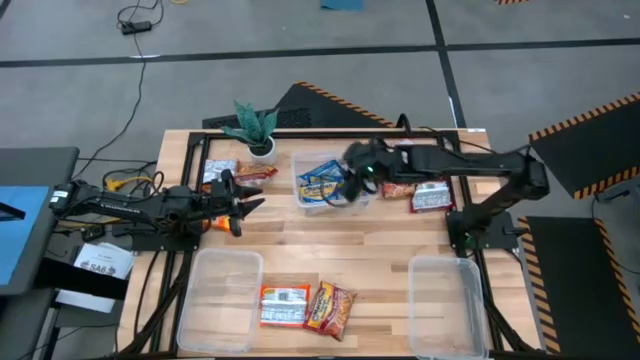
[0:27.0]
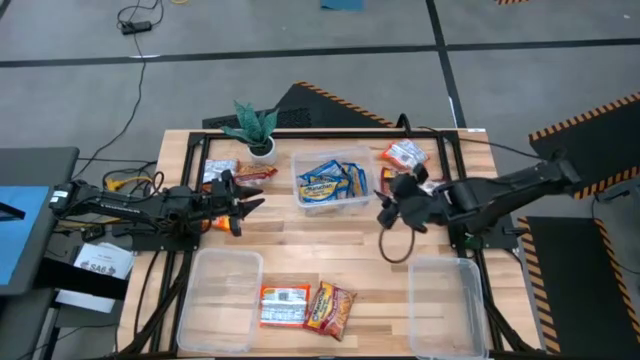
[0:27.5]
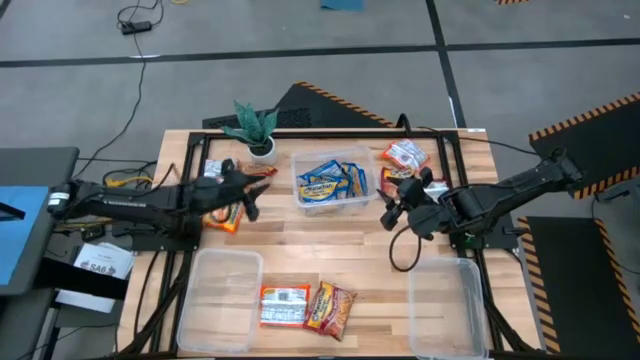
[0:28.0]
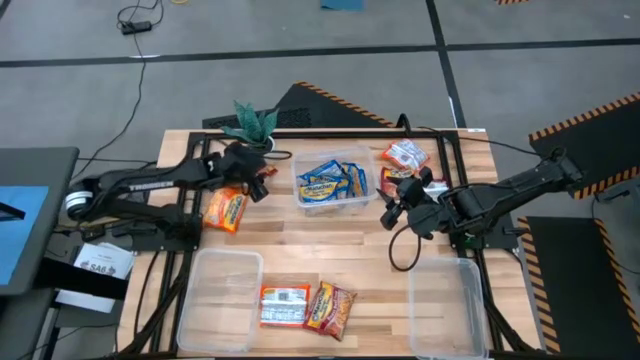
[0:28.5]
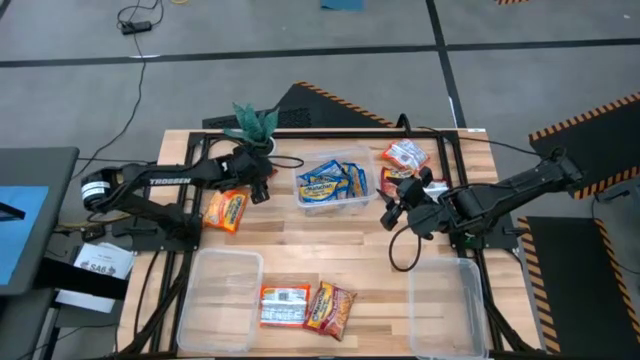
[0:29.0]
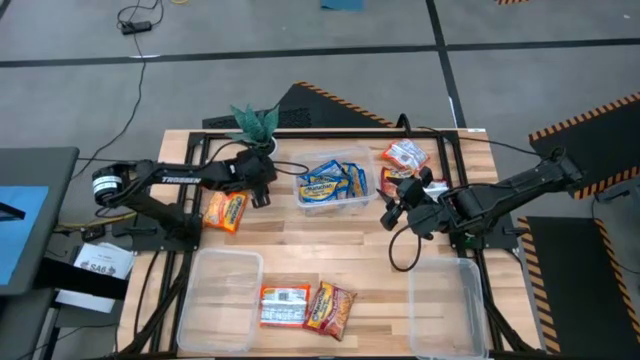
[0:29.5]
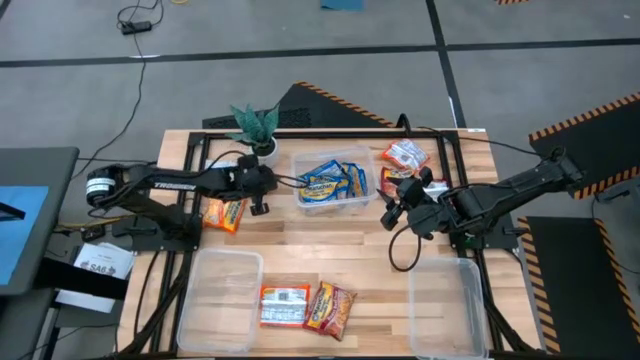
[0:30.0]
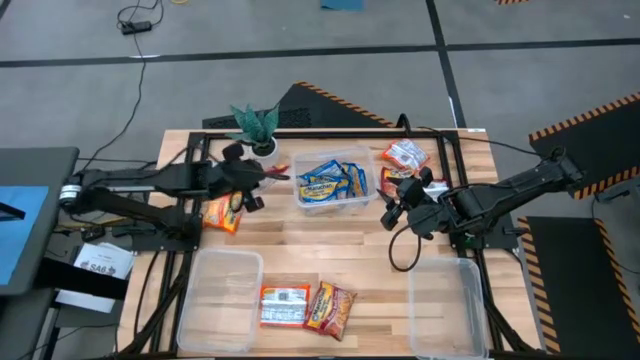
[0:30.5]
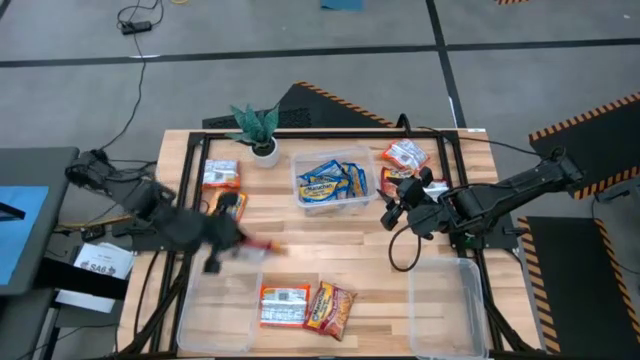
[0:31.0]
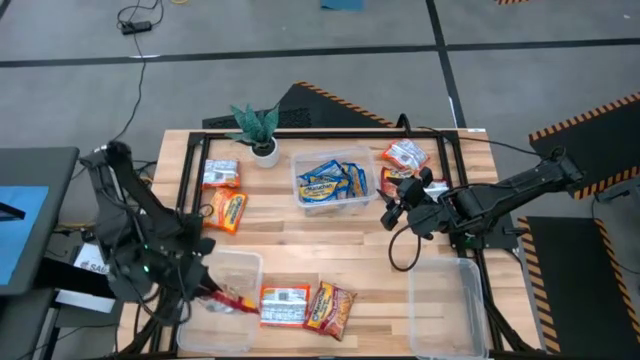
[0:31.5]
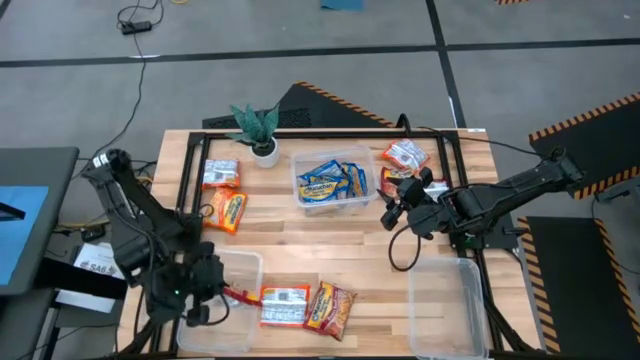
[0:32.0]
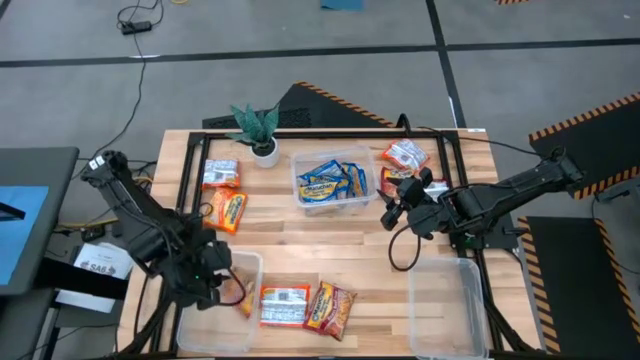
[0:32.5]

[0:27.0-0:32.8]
Task: Sort Maruchan noodles
Put the red noodle packet into the bottom left transparent bin

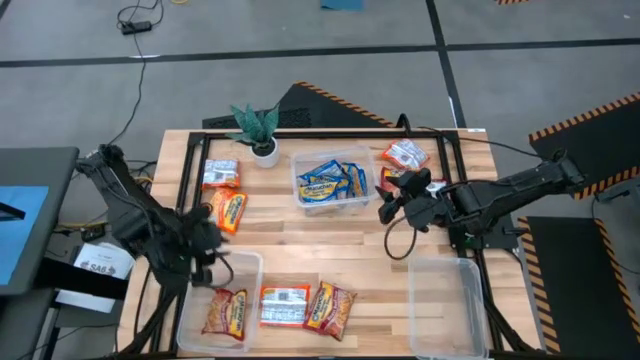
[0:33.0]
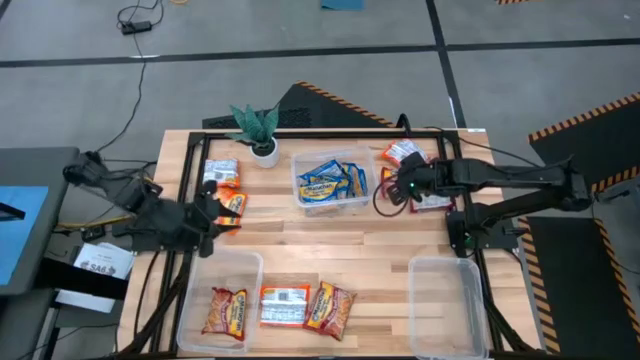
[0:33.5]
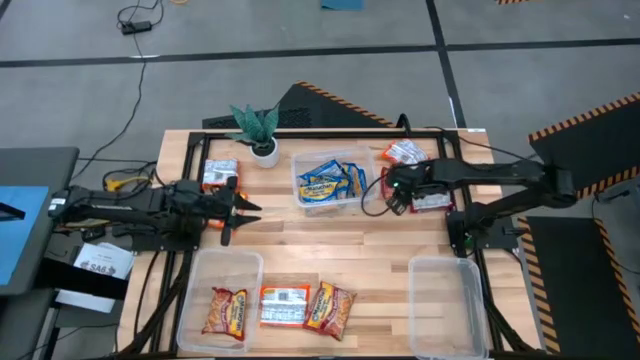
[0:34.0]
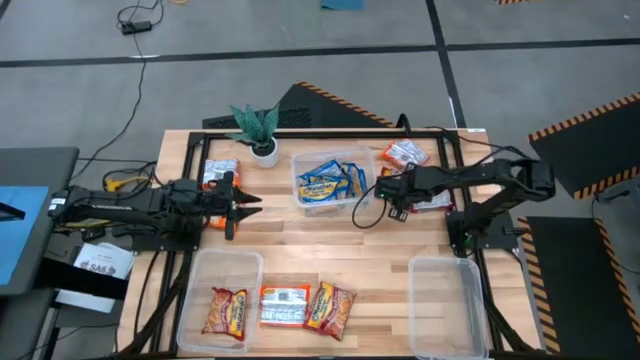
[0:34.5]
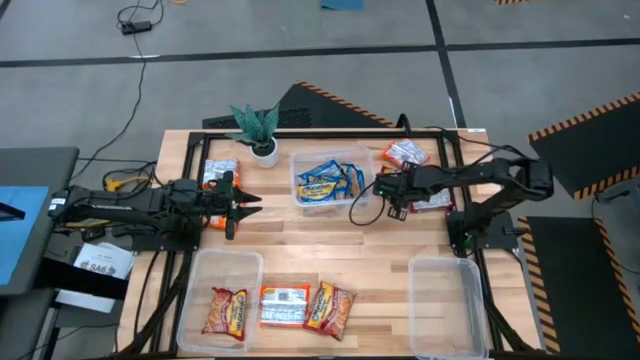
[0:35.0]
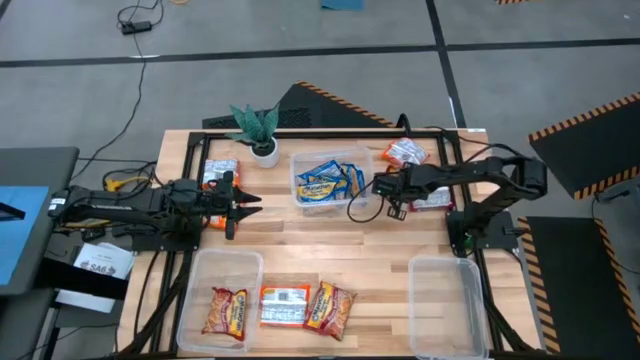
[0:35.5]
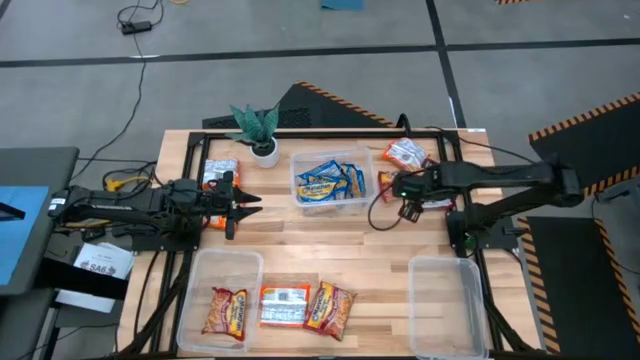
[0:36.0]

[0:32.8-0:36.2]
Put the top left red noodle packet into the bottom left transparent bin

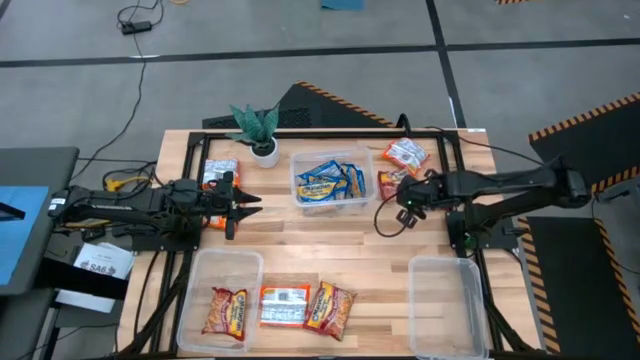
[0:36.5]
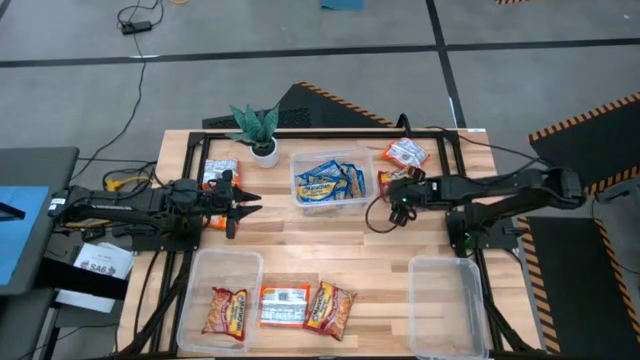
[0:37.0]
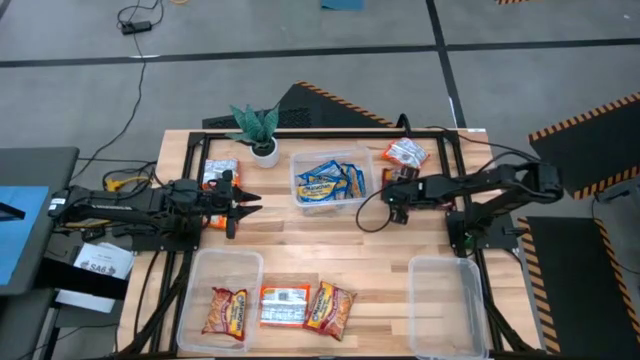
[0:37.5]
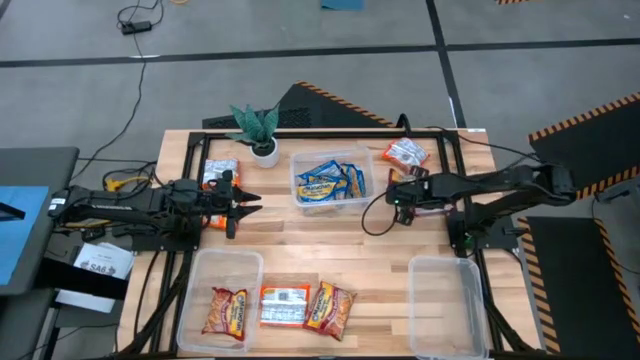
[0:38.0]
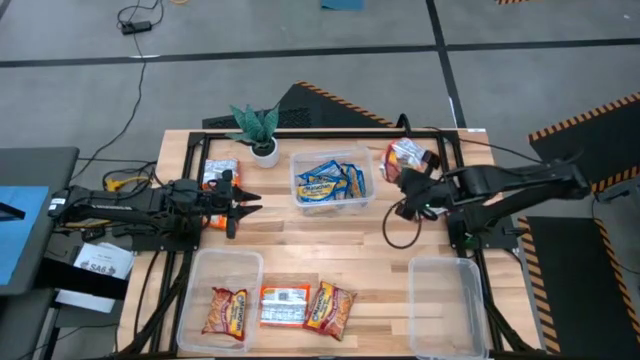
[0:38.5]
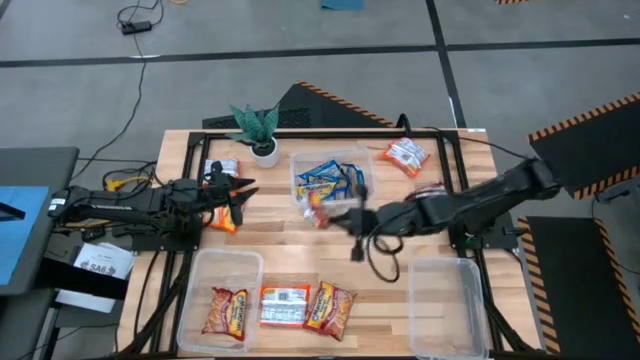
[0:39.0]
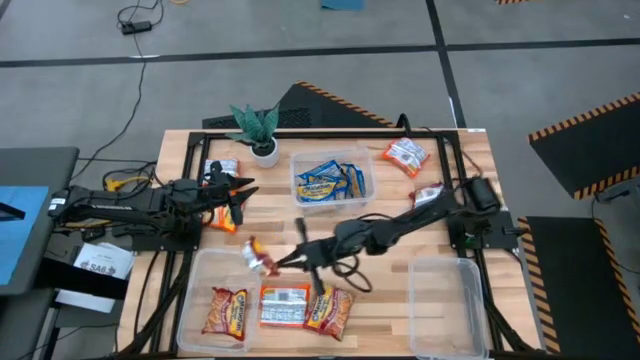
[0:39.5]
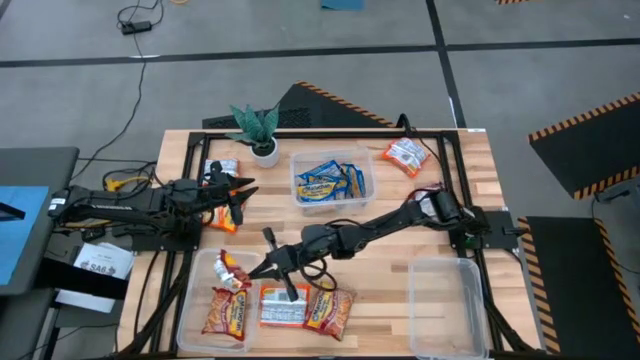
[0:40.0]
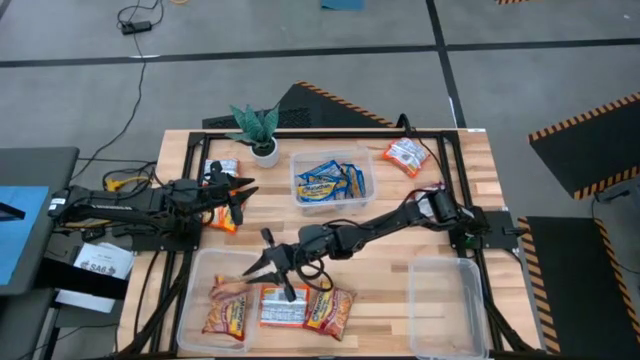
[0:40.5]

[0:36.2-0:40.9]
Put the top left red noodle packet into the bottom left transparent bin

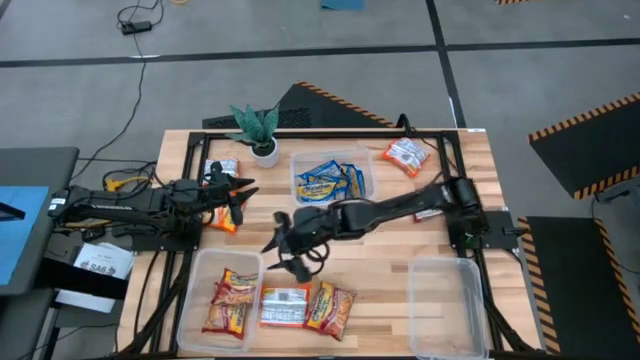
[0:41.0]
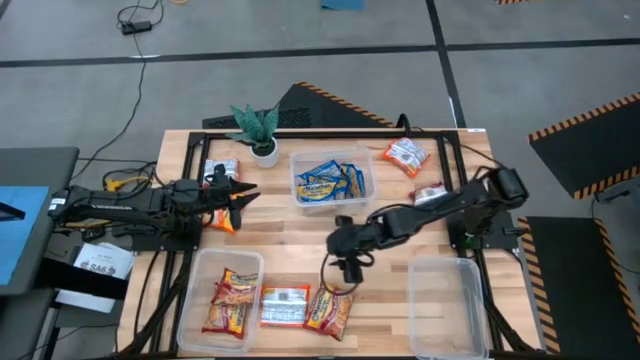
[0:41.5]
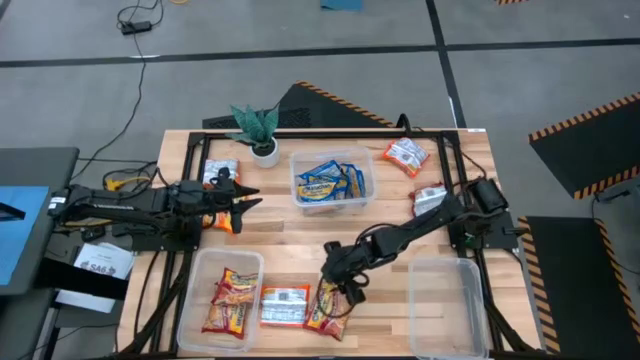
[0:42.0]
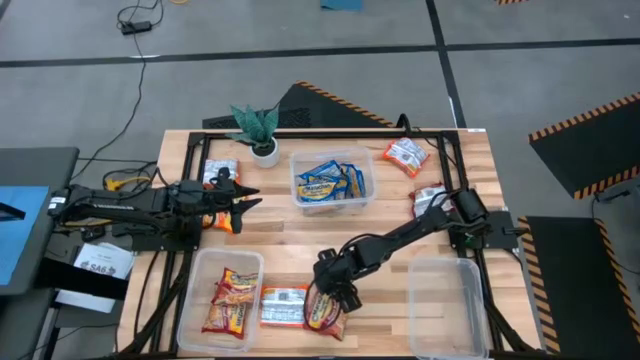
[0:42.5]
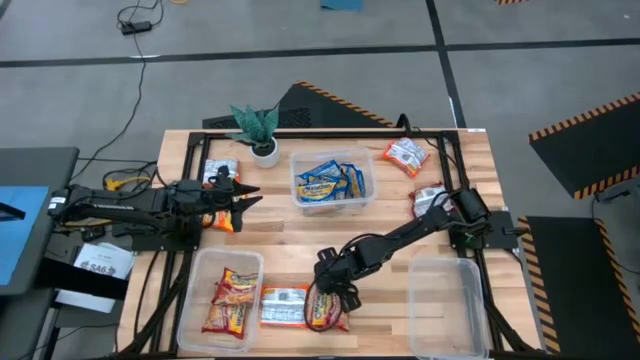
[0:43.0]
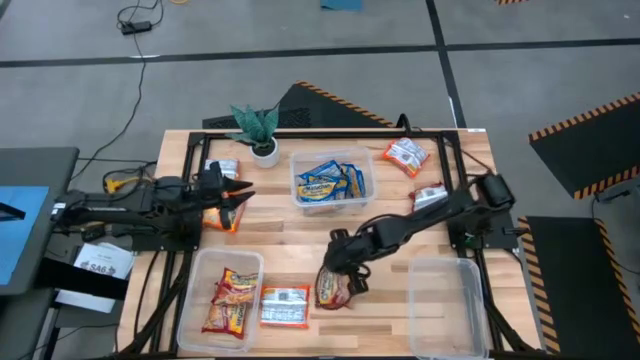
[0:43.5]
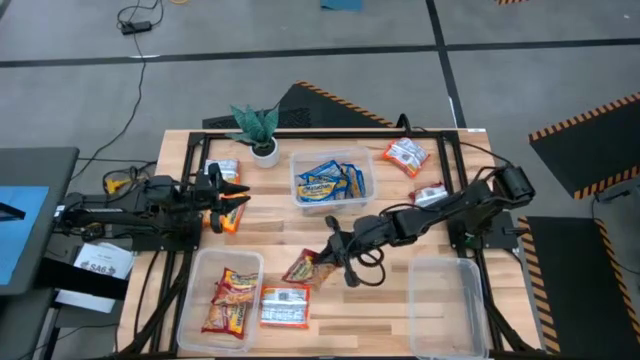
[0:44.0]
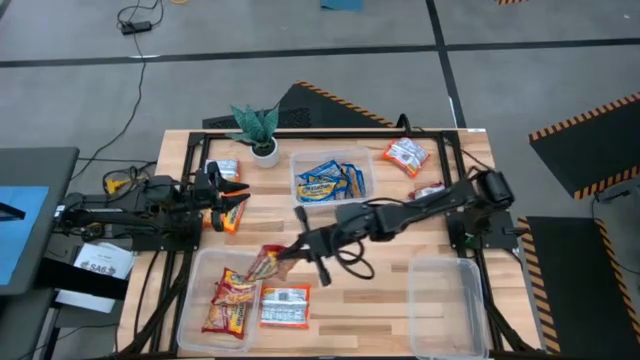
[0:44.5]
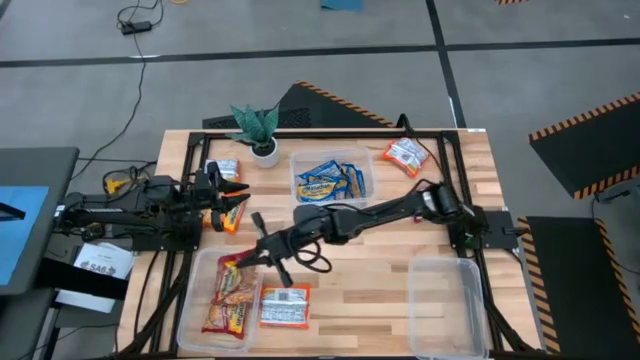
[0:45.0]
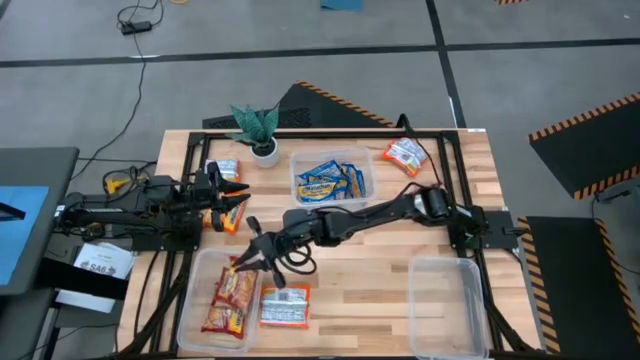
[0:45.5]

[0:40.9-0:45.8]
Put the bottom red noodle packet into the bottom left transparent bin

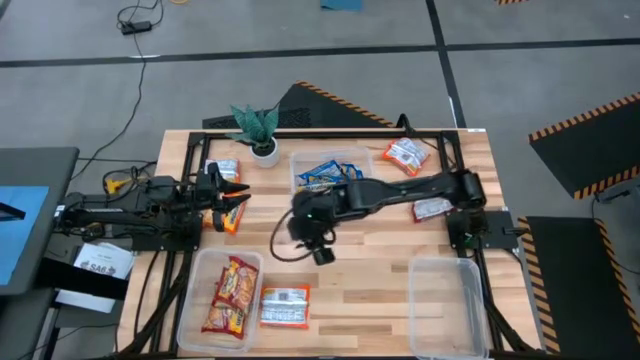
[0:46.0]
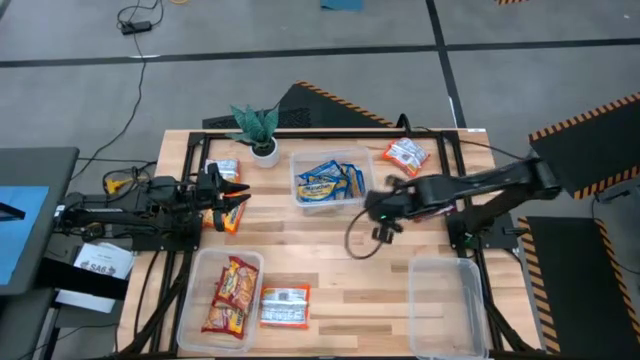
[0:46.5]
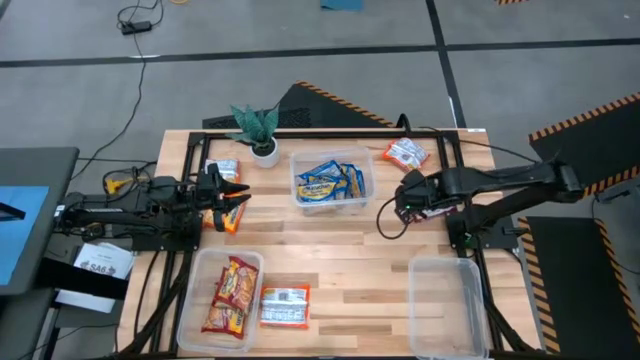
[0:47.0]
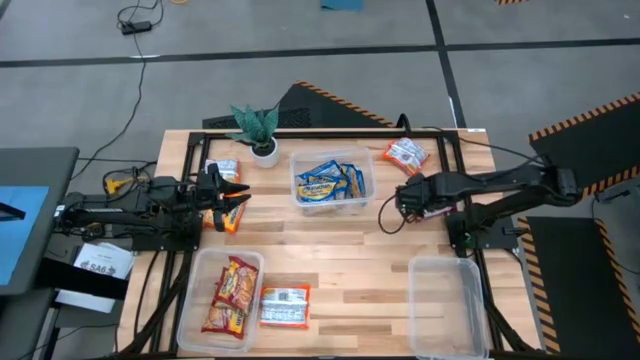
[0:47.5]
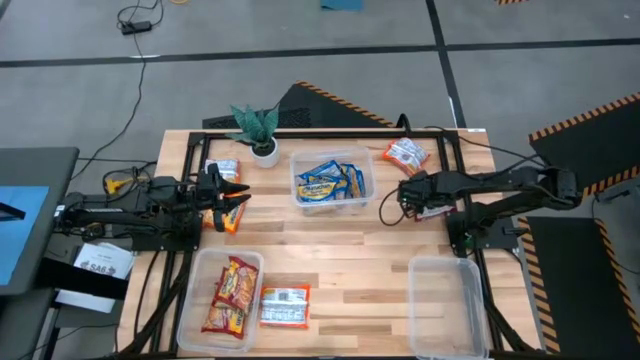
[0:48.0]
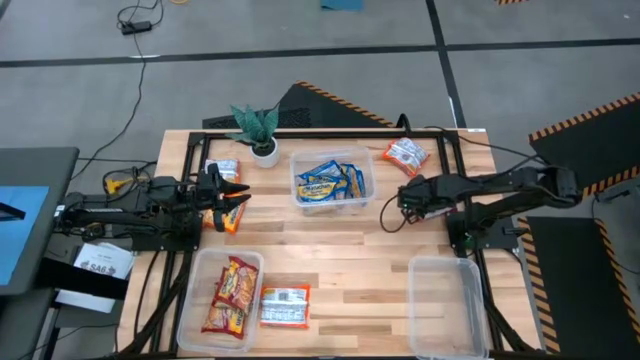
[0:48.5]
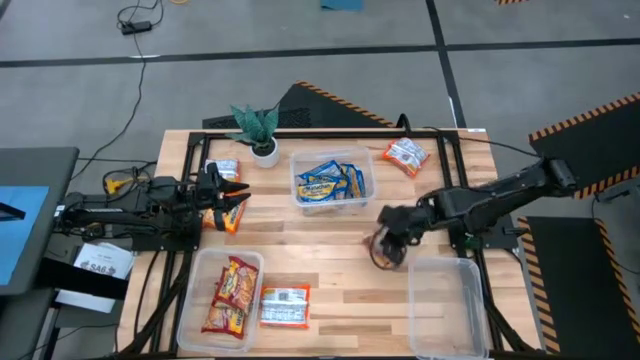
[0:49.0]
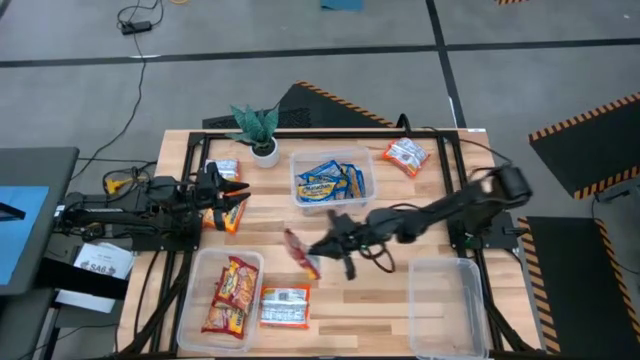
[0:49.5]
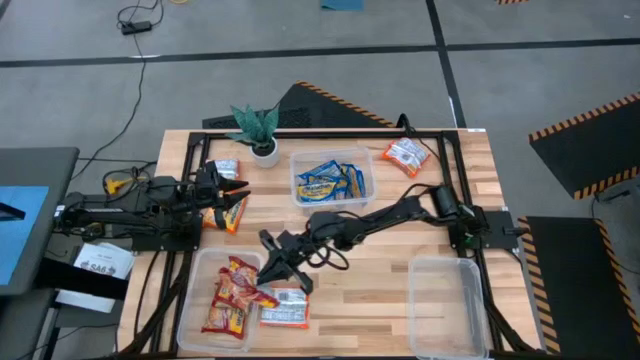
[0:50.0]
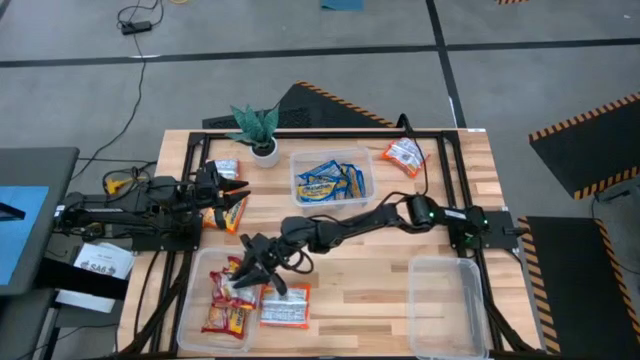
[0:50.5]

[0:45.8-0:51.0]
Put the red noodle packet into the bottom left transparent bin
